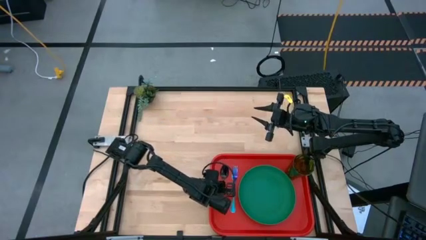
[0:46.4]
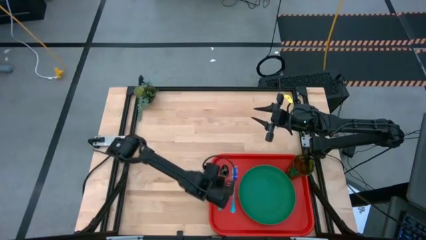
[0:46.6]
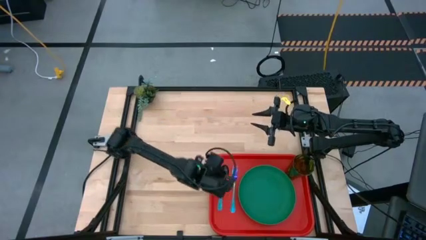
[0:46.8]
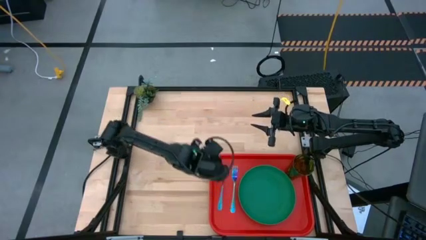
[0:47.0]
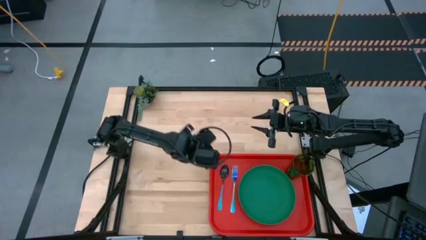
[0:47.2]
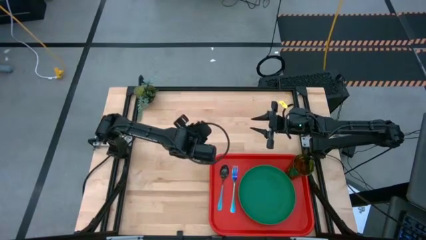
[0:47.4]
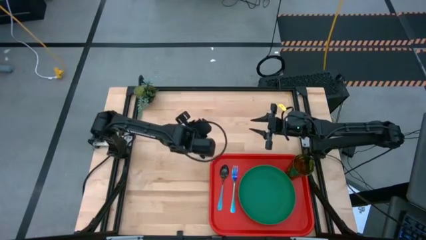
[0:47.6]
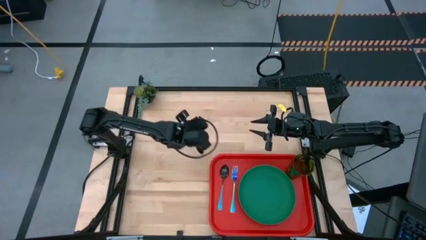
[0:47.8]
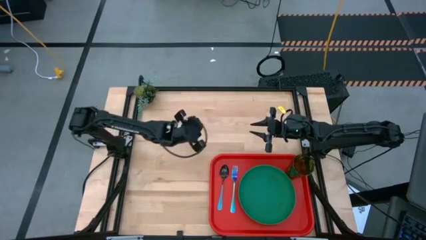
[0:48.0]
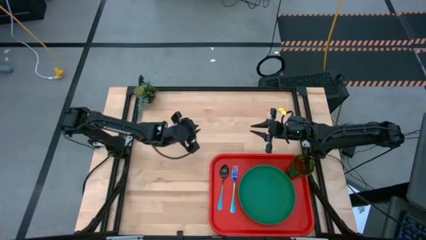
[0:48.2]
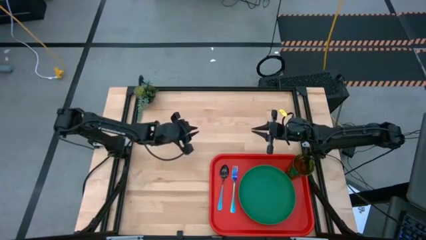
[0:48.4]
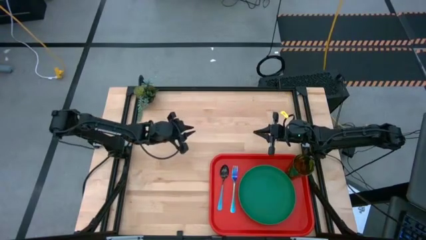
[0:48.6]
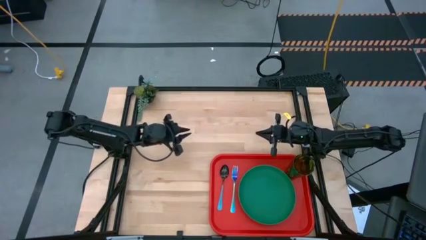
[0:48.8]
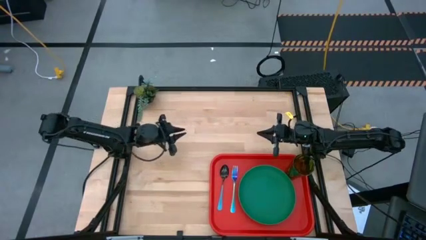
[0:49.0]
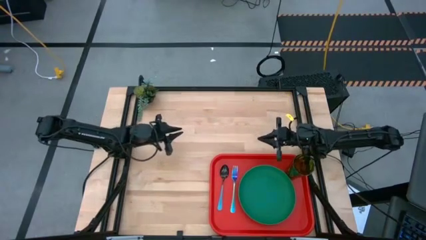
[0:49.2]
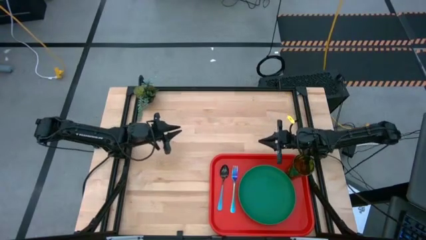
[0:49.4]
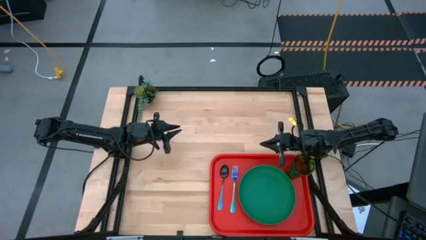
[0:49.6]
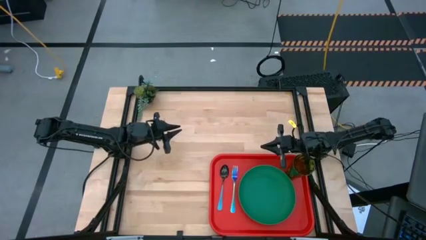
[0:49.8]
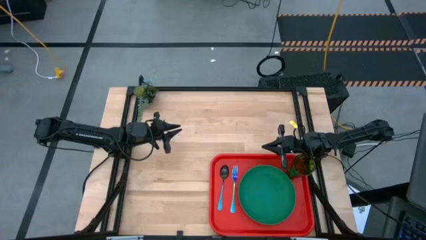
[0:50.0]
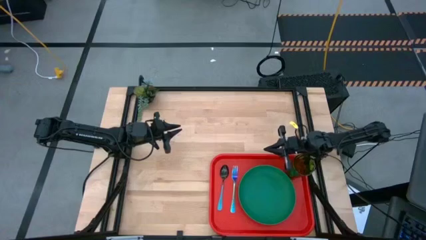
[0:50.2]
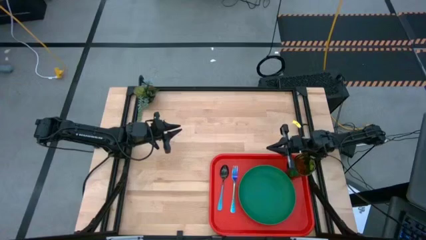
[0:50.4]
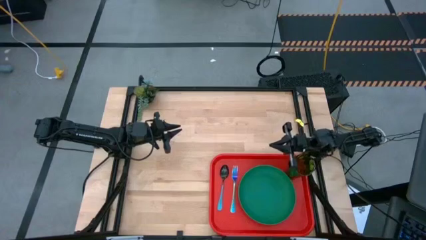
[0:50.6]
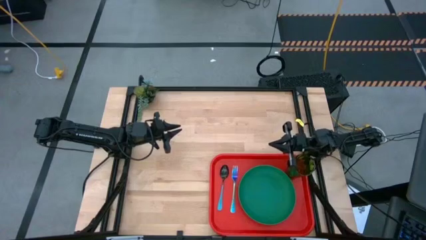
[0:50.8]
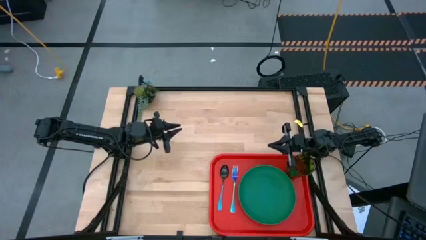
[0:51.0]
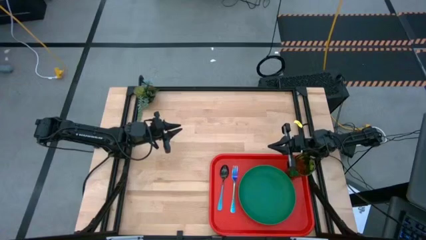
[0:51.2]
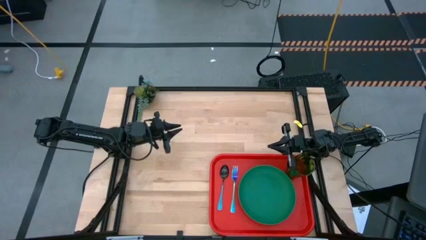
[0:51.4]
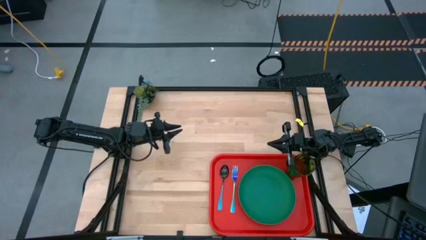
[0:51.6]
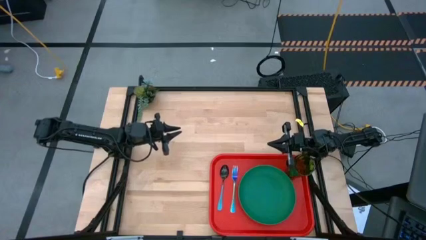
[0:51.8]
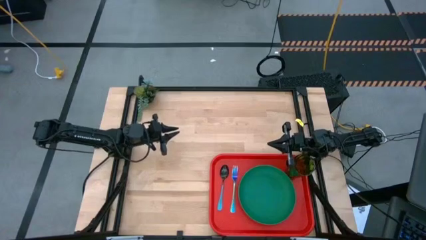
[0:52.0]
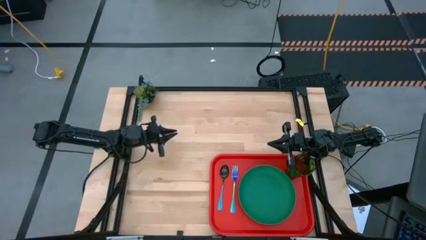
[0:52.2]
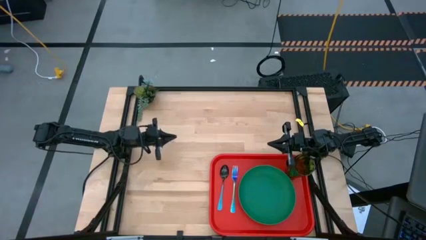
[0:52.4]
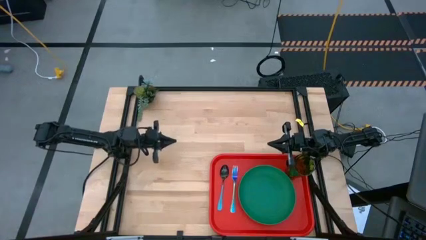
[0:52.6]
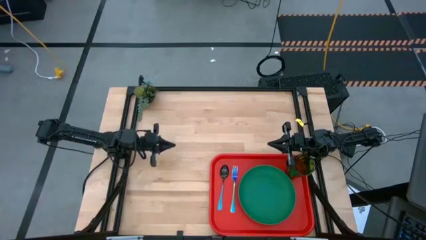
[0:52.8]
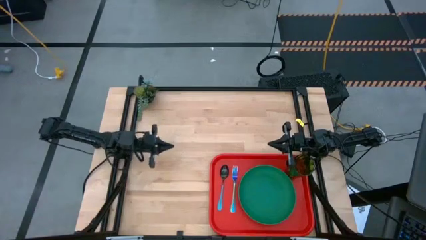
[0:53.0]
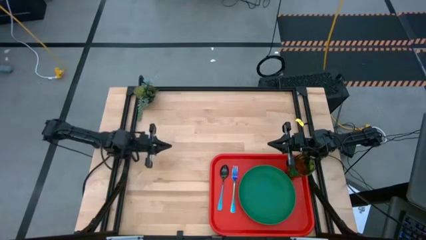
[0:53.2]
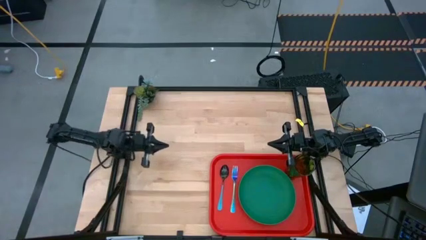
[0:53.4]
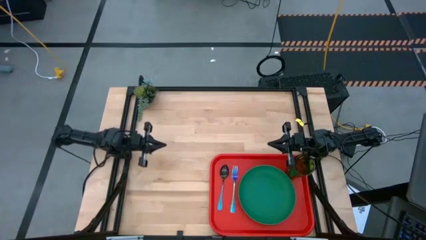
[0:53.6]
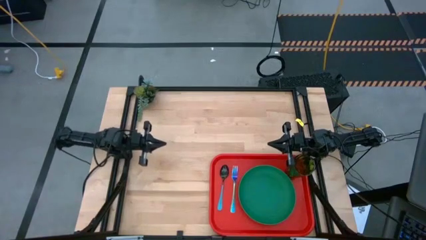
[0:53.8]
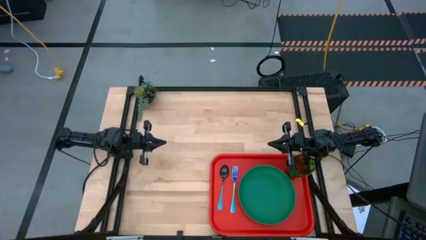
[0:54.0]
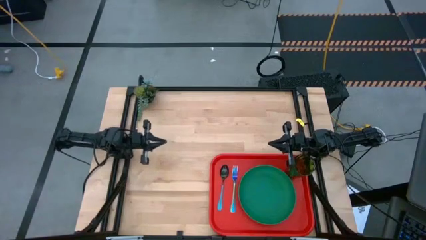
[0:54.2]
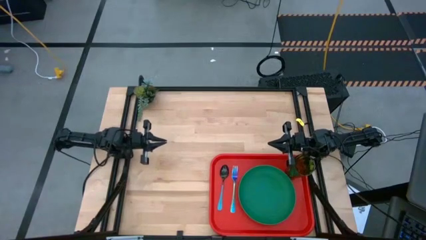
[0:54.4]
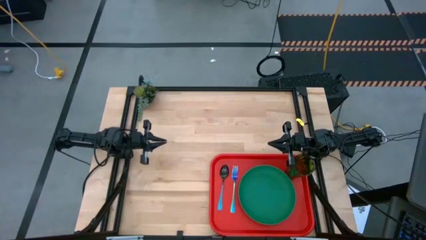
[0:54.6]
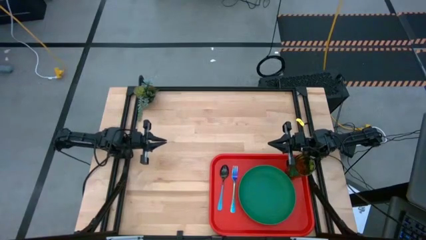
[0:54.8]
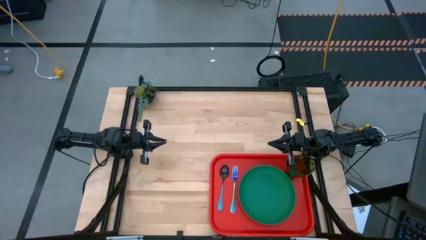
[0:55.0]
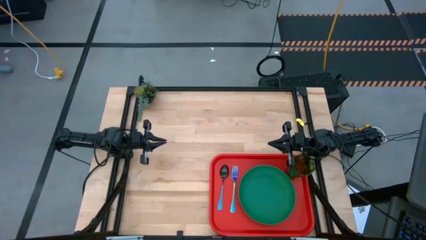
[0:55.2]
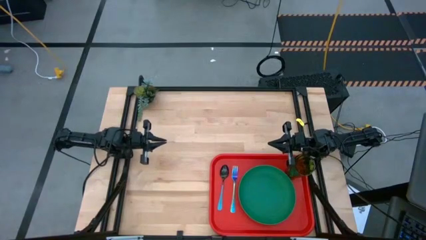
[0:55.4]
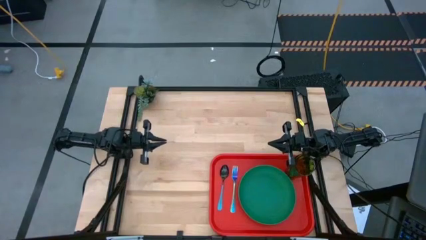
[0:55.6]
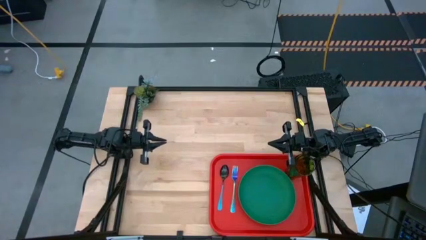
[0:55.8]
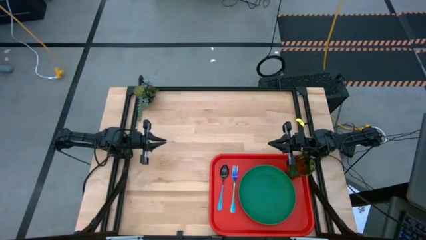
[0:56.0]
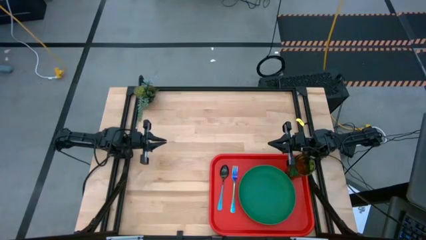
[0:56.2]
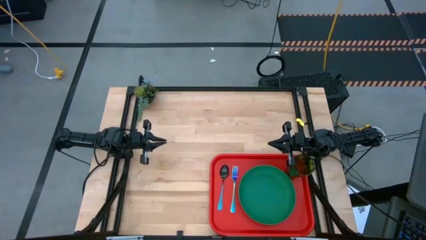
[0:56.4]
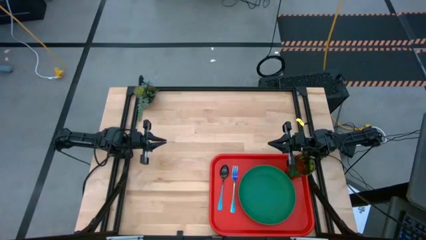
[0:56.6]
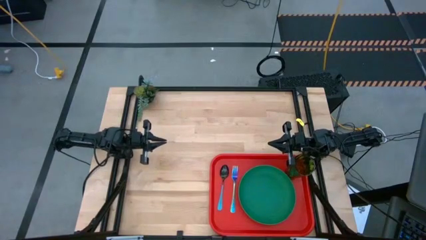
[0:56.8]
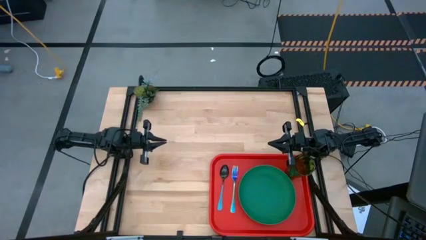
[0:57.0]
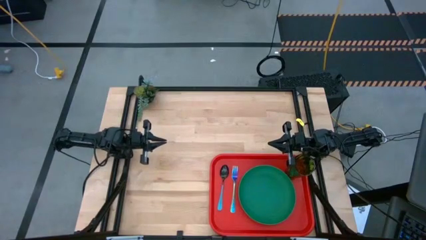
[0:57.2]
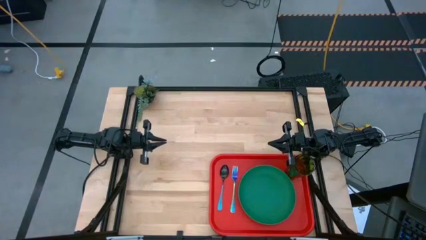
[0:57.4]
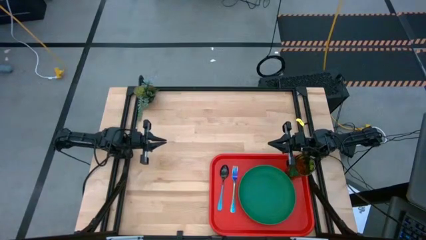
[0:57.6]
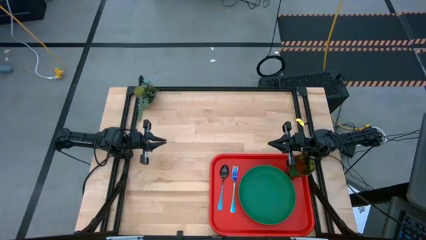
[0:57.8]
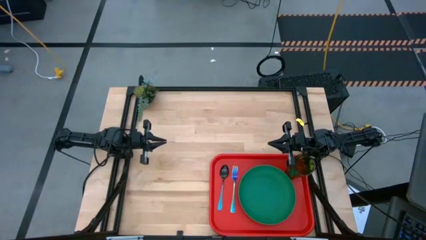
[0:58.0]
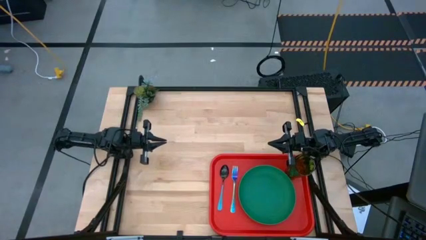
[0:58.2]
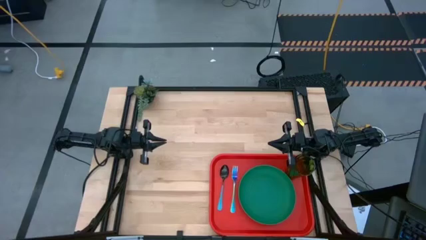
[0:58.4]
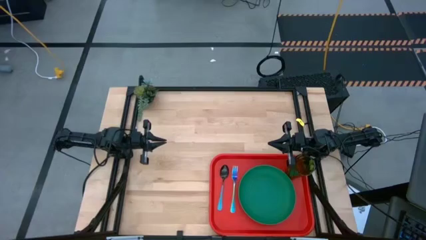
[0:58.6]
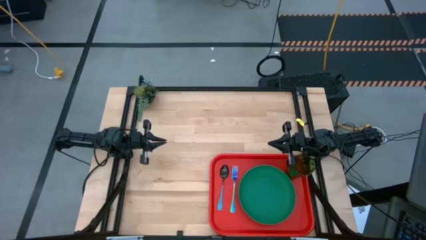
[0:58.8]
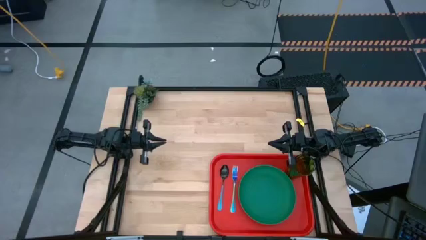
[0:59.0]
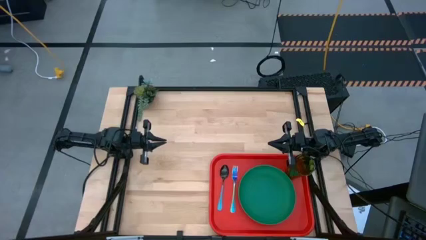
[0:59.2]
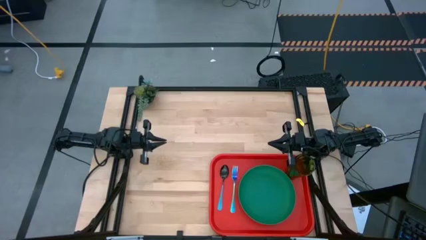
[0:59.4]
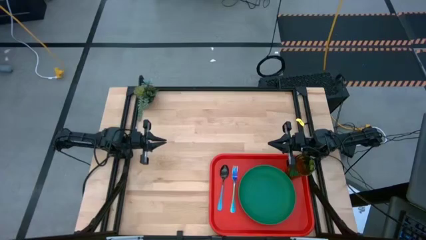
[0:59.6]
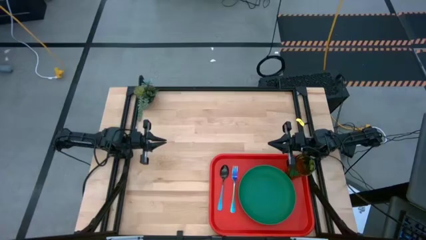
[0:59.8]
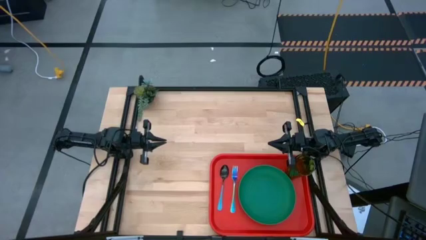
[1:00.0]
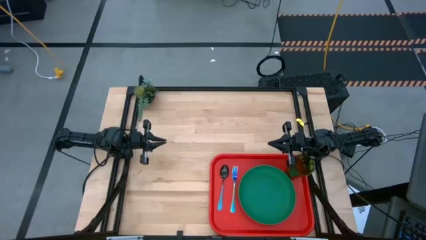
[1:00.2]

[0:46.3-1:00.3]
Task: Pick and place plate/cup/fork/spoon on tray
Return to Home Position

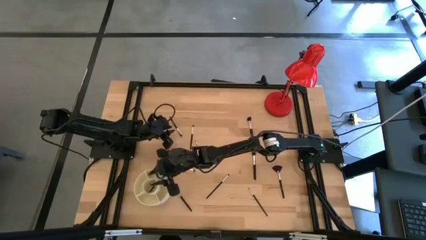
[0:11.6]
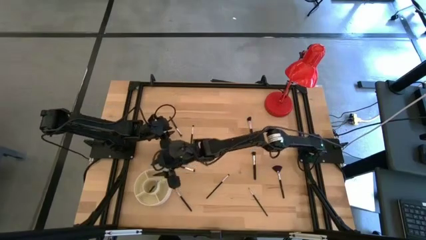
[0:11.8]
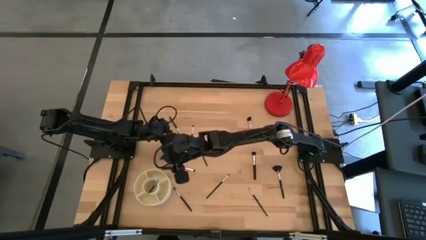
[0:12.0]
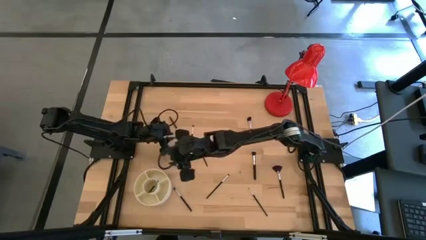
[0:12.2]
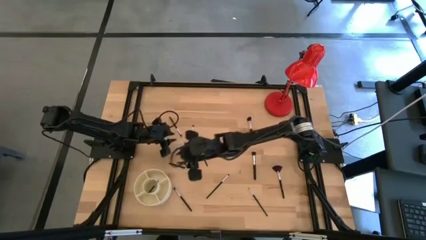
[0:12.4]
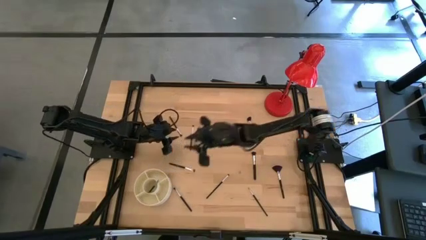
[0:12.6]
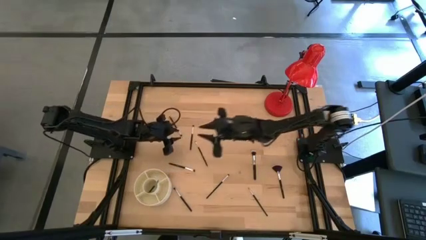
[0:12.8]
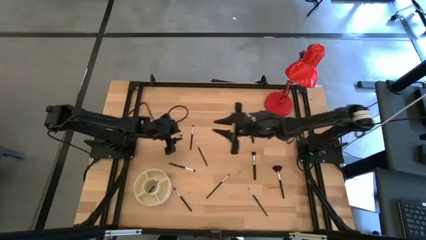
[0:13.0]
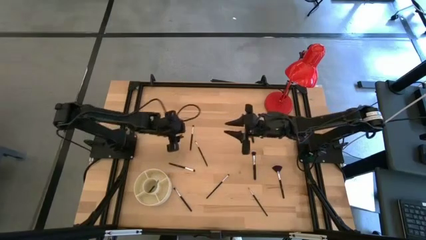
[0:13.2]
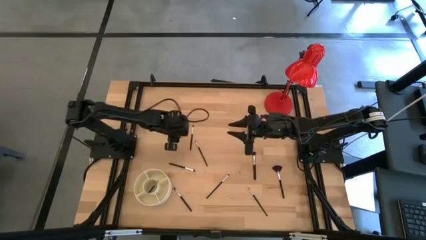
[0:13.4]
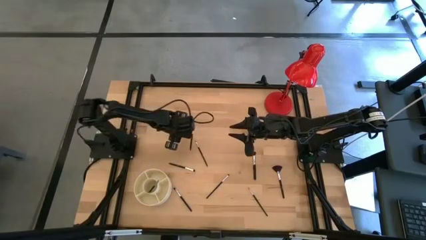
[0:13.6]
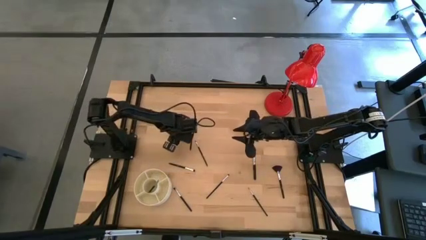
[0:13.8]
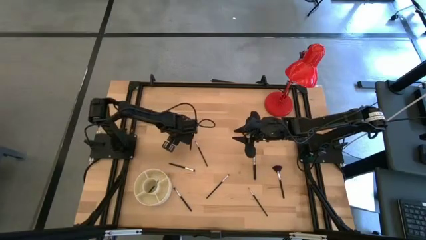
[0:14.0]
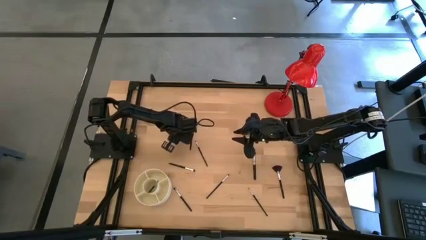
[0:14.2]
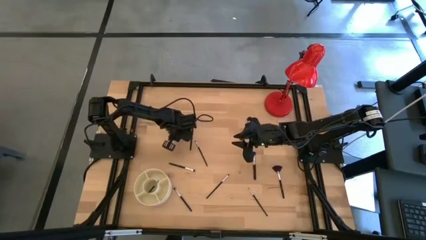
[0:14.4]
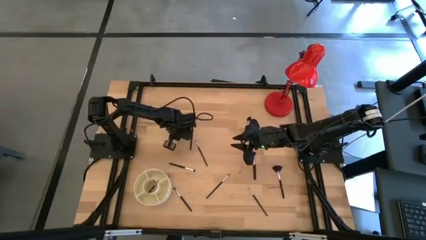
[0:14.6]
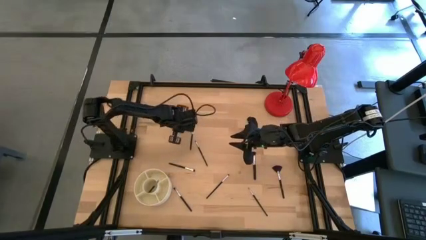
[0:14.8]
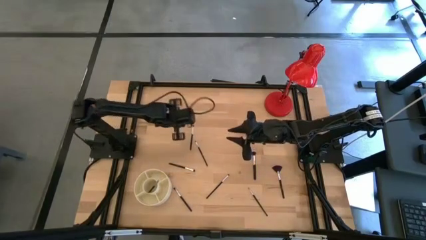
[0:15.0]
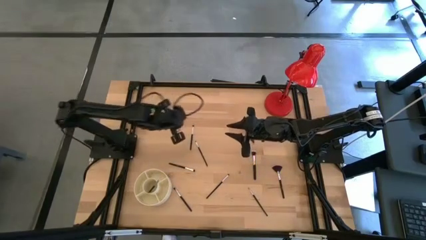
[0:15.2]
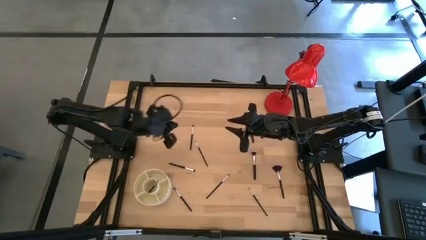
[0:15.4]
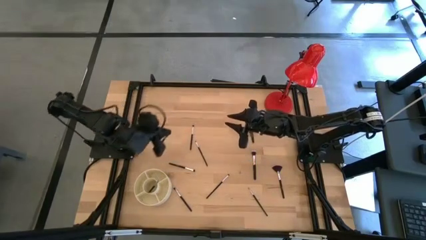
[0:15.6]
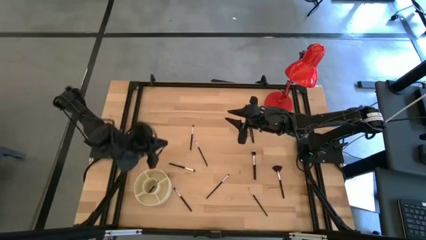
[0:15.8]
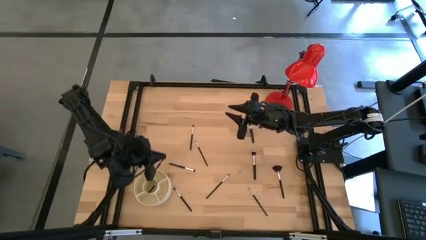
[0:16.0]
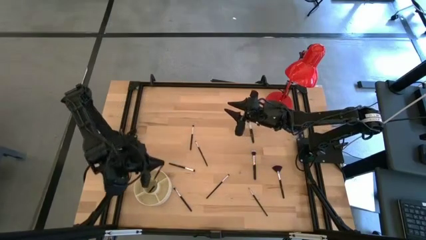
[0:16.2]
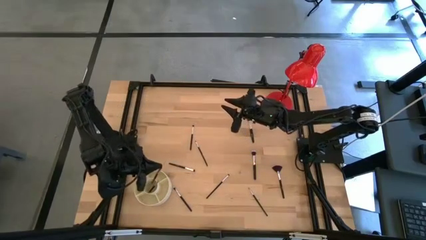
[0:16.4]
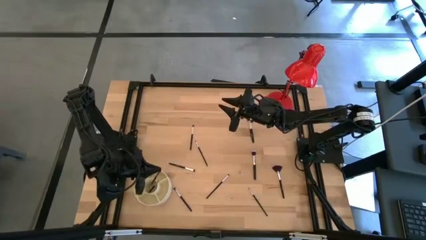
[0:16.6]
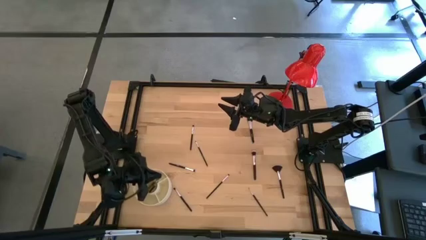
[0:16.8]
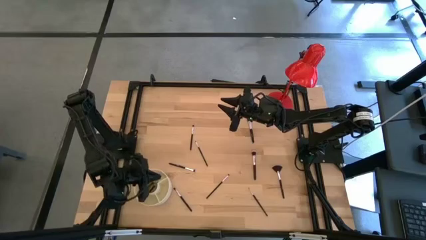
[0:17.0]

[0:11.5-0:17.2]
Task: Put items in baskets/containers
Put the black eyeshadow brush into the white organizer
